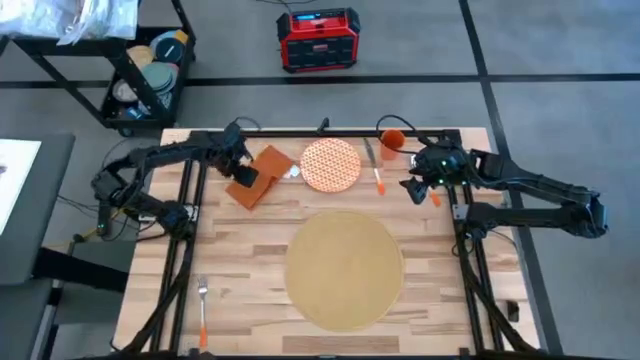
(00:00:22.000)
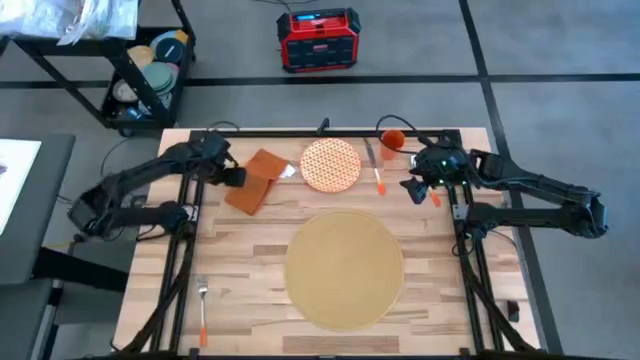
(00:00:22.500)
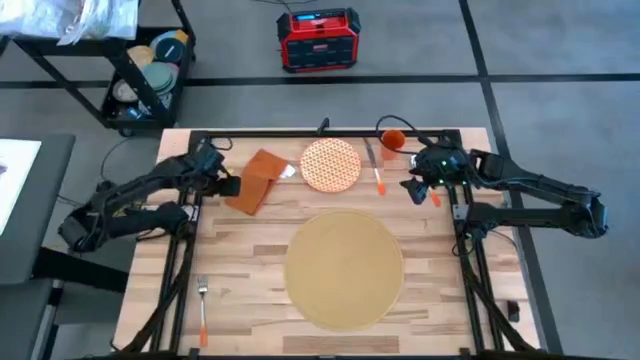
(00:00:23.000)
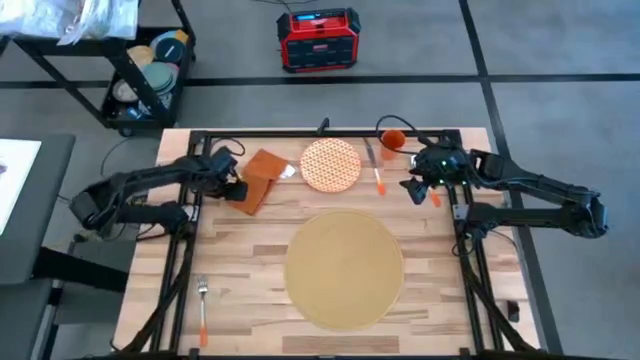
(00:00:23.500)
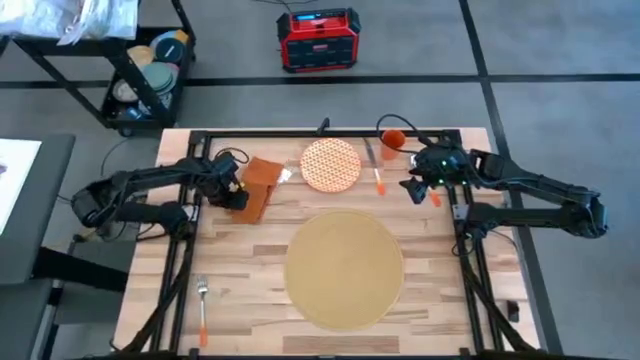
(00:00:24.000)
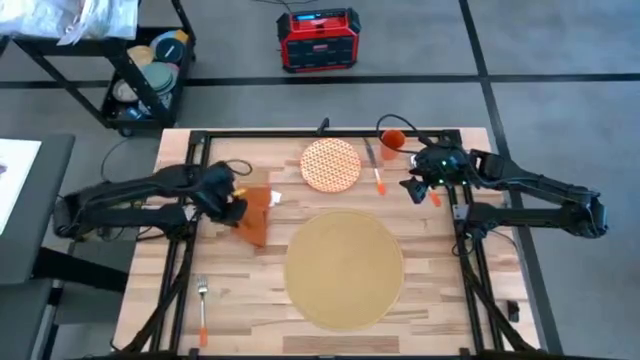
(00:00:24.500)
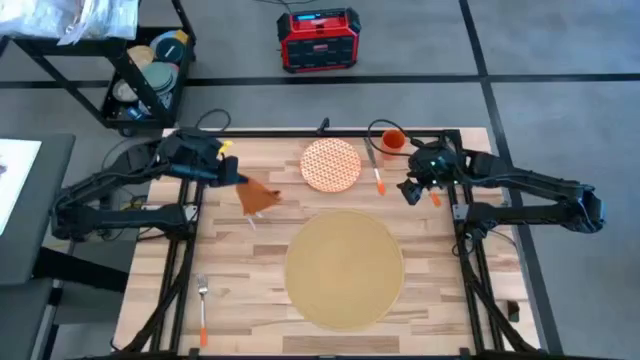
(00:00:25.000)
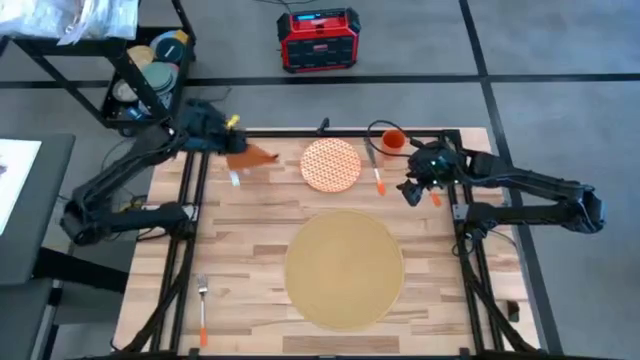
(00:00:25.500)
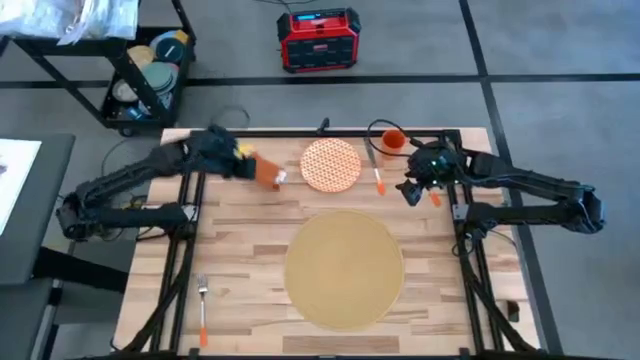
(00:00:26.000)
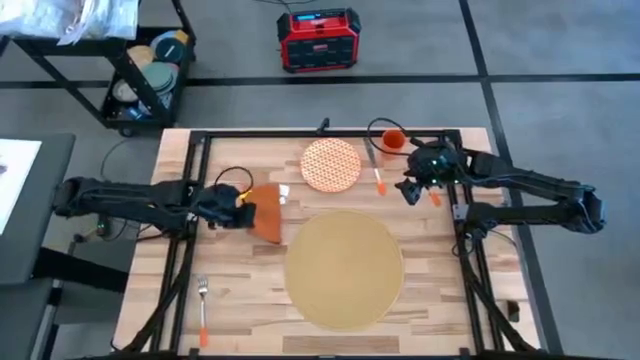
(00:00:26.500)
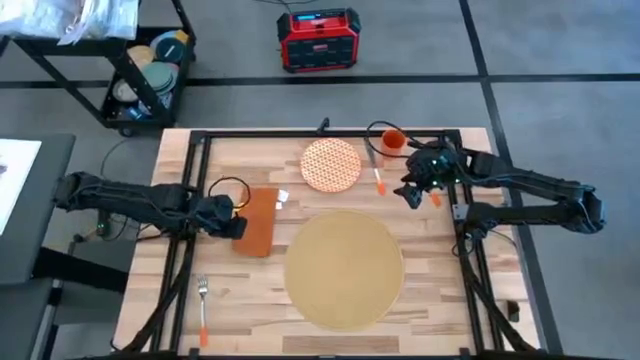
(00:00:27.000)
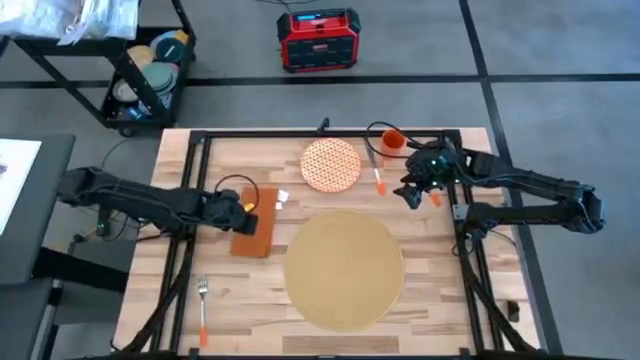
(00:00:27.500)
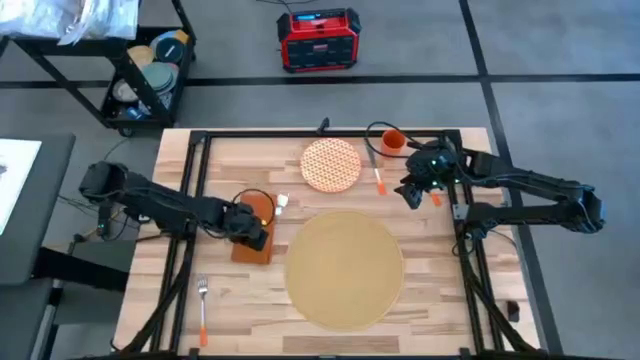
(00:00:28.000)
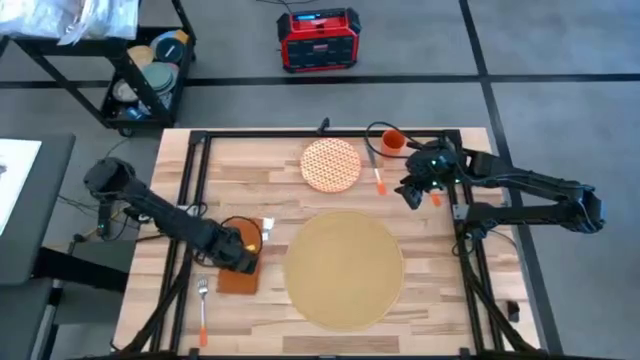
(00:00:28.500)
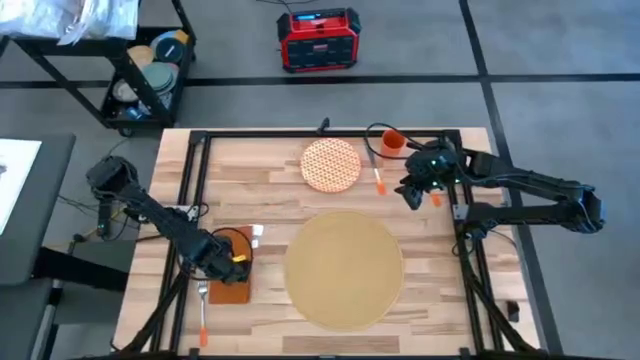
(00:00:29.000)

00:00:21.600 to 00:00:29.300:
Task: Set table place
Put the orange table napkin to the left of the brown placemat

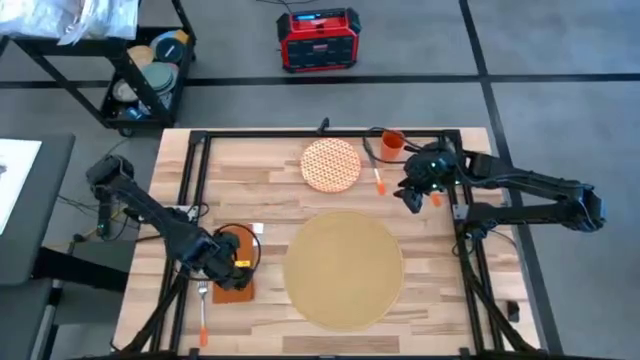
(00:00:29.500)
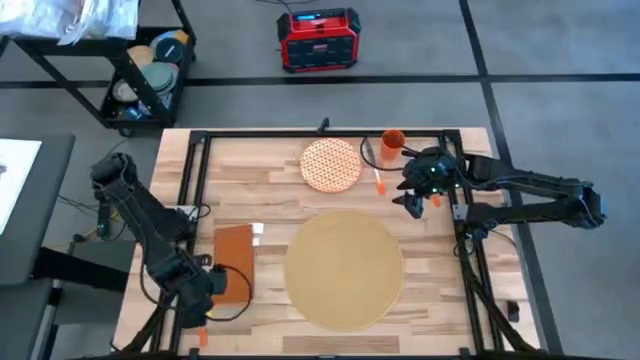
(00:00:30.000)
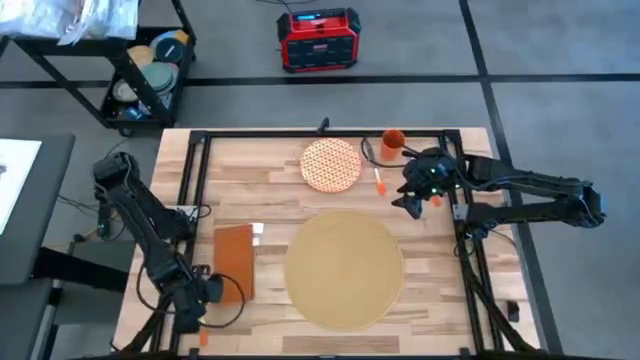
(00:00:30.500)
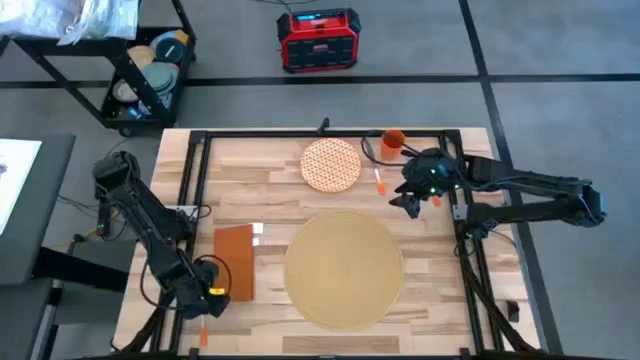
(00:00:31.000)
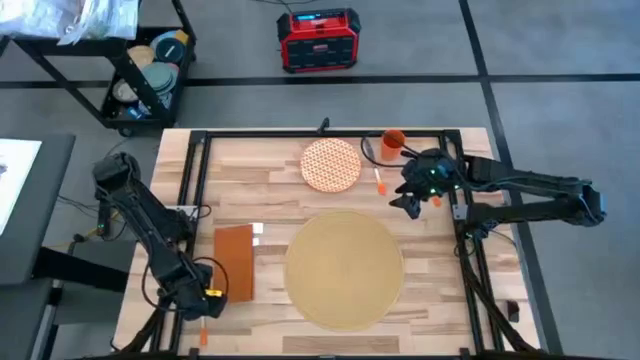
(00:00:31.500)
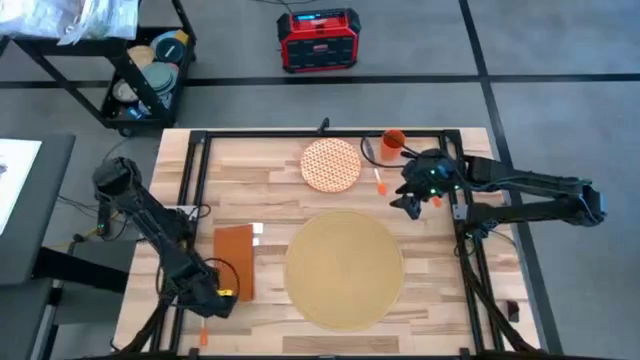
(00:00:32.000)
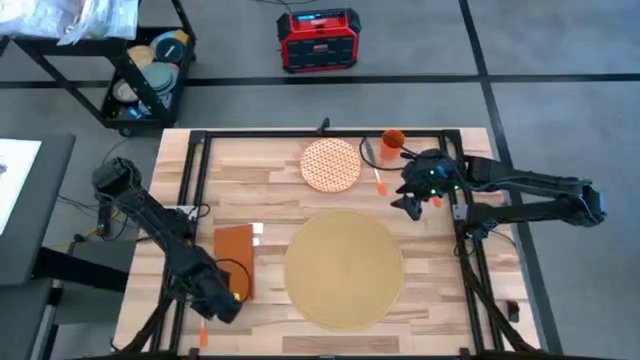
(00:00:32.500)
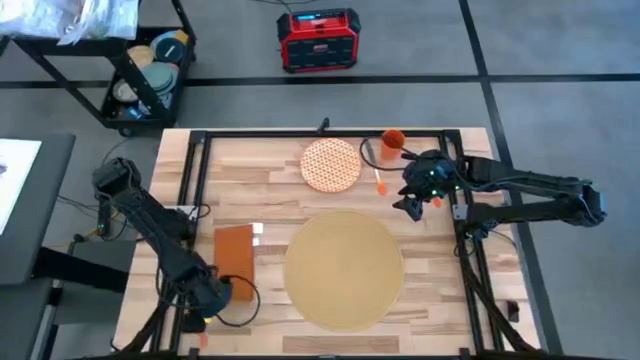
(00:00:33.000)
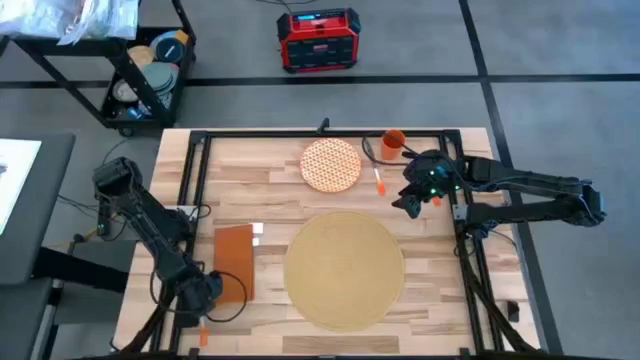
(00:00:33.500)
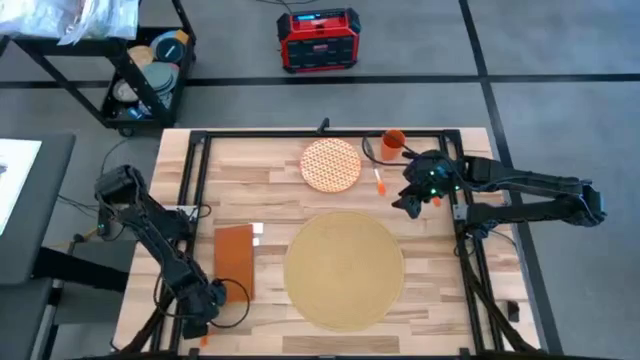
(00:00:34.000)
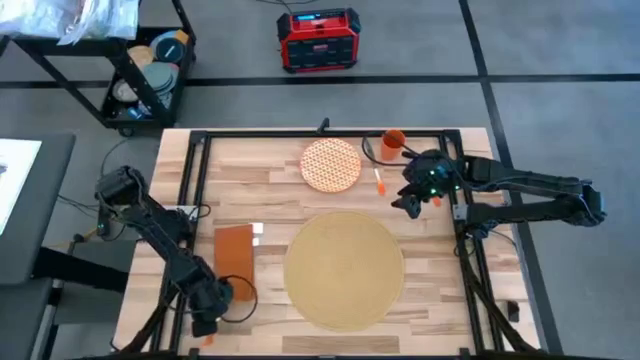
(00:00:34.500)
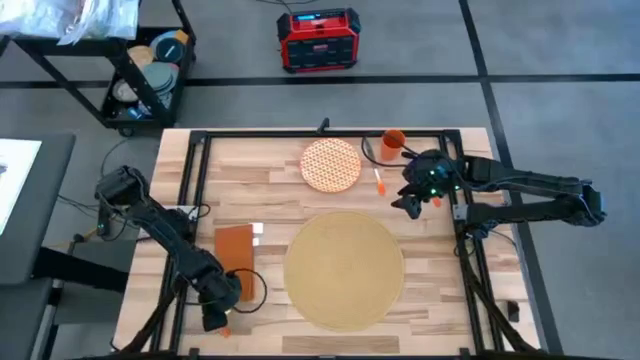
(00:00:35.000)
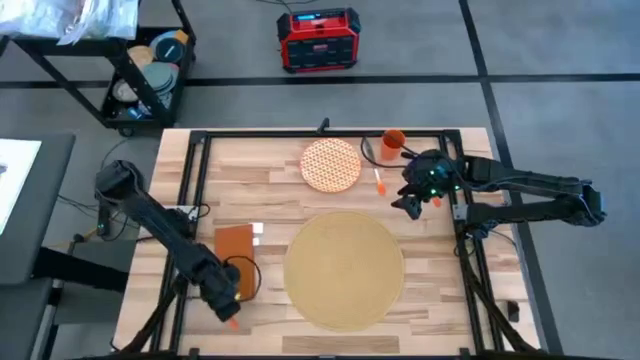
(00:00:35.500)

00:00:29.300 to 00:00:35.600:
Put the orange fork on top of the orange table napkin

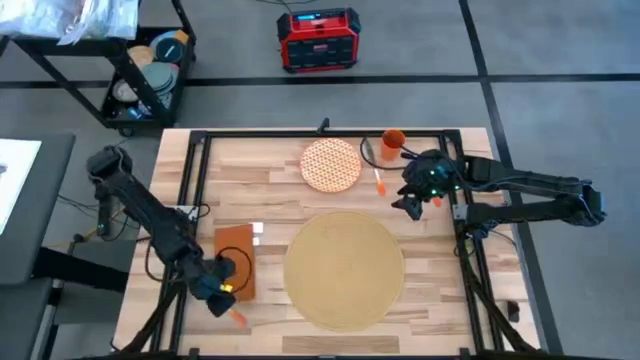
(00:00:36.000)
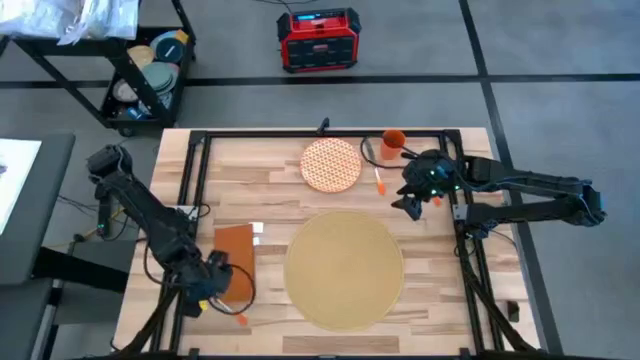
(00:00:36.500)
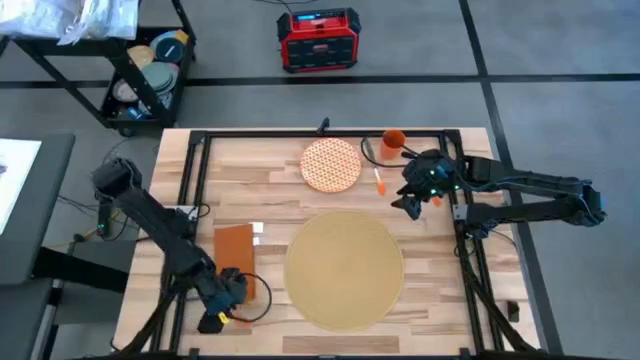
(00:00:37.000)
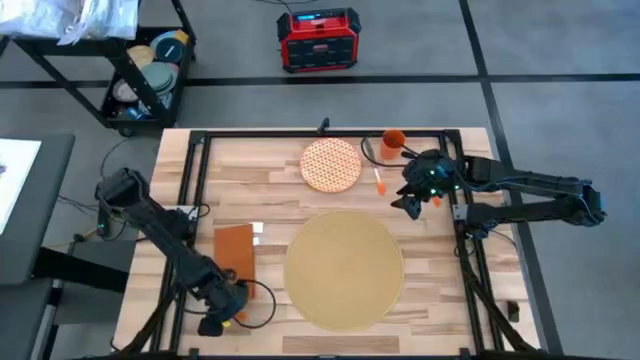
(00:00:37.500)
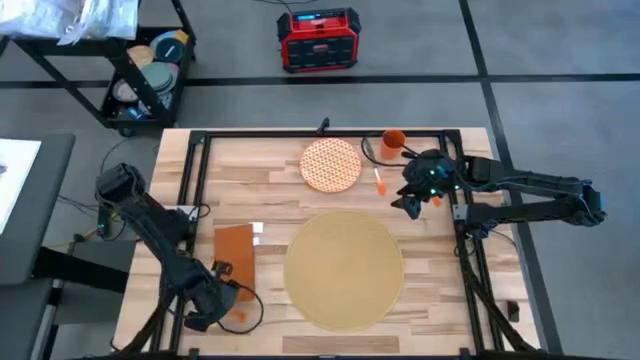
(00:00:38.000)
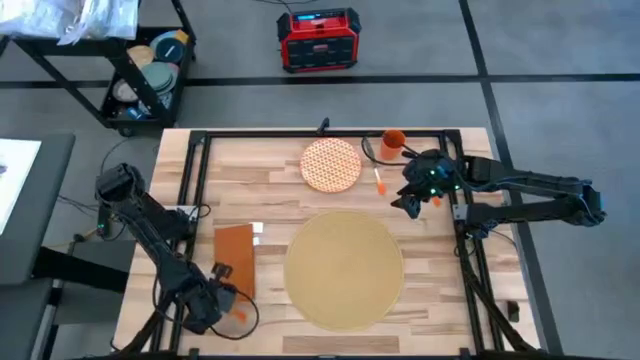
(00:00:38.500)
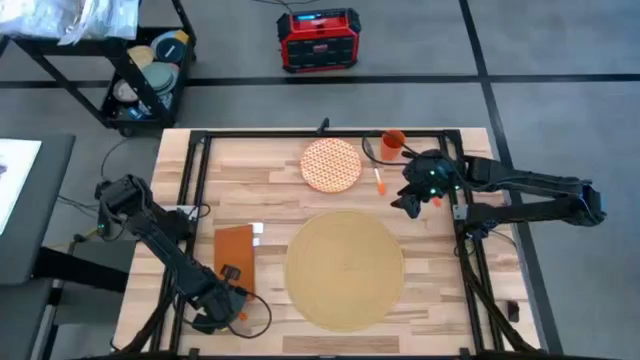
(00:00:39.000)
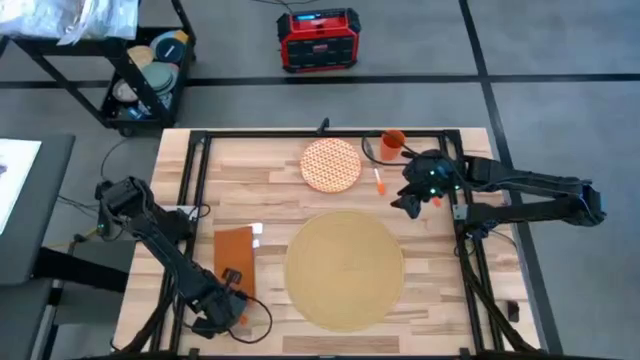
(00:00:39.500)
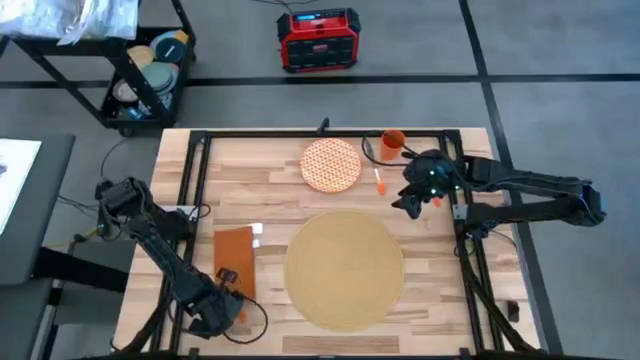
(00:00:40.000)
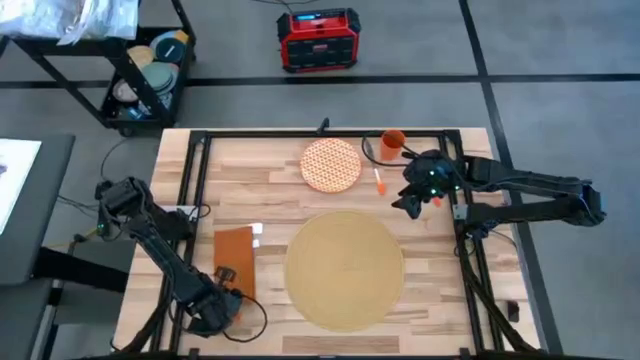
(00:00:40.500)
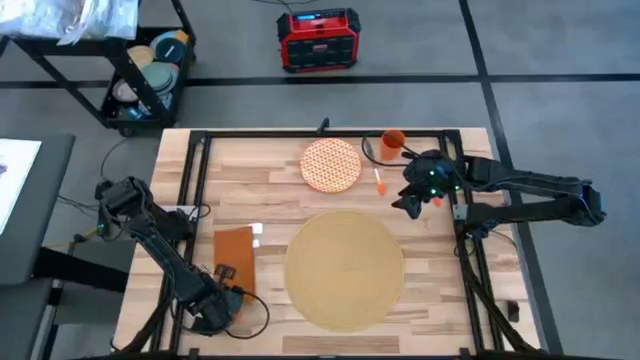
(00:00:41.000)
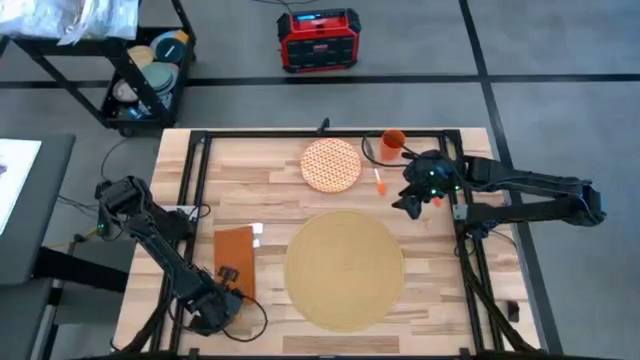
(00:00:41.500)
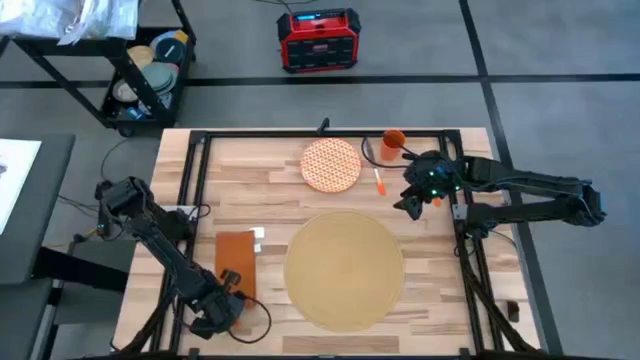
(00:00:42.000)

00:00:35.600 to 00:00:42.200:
Put the orange fork on top of the orange table napkin
